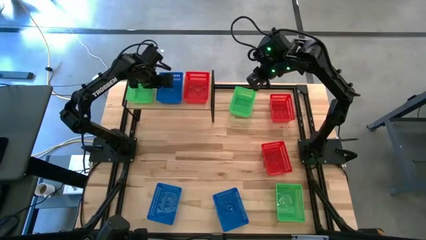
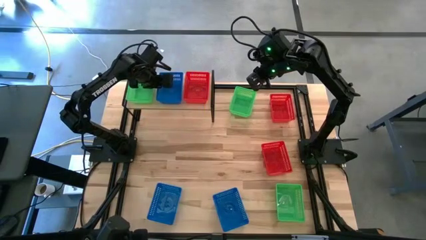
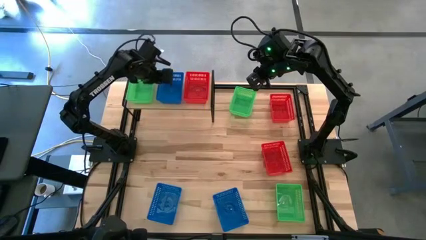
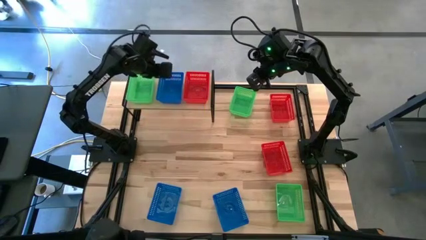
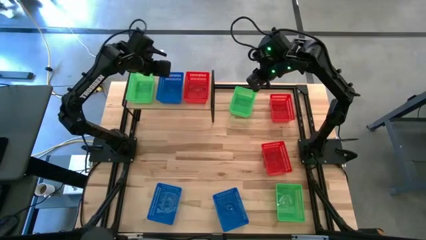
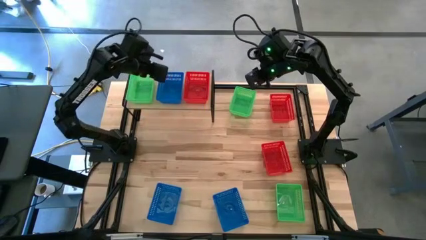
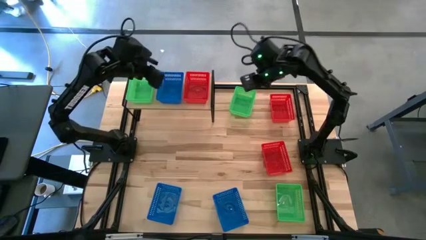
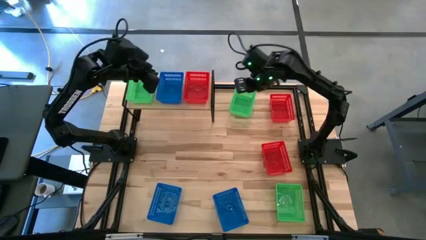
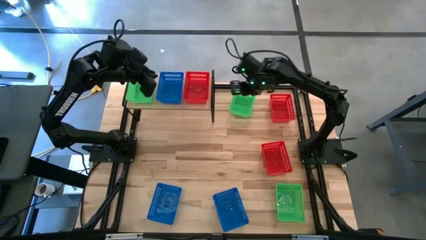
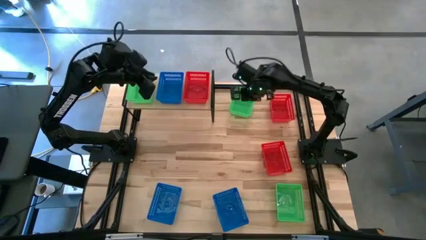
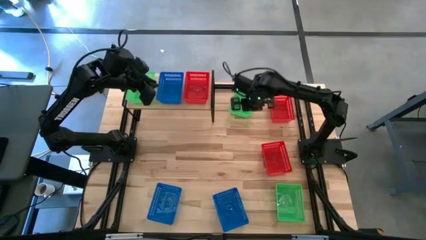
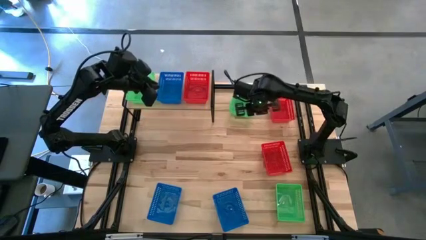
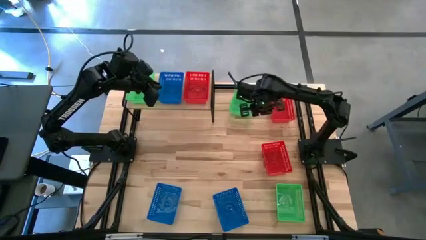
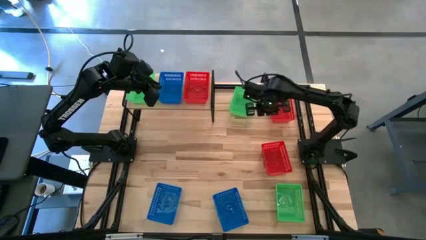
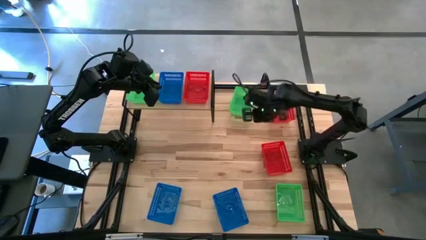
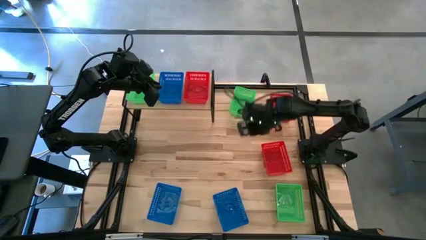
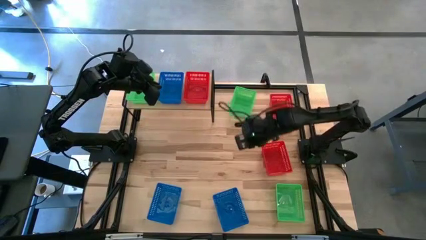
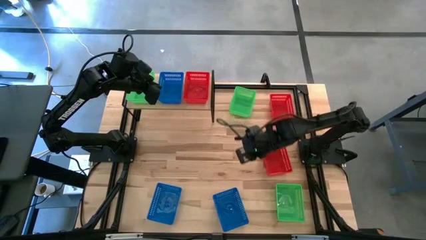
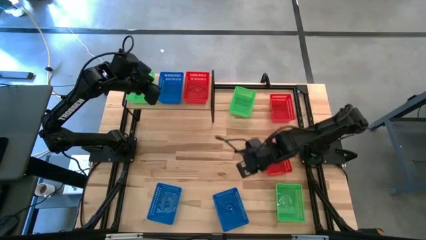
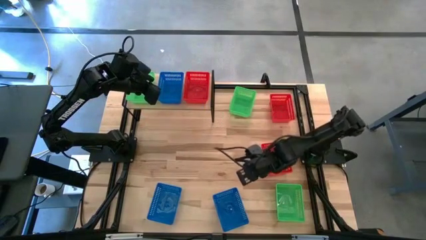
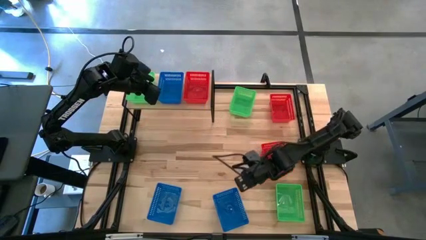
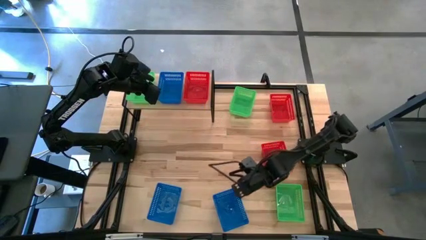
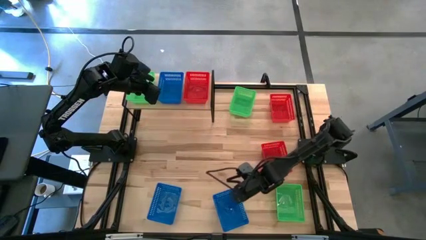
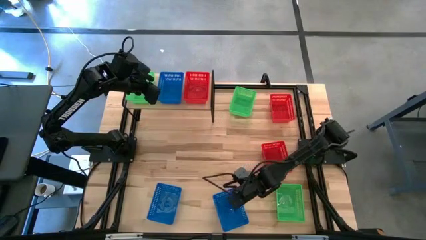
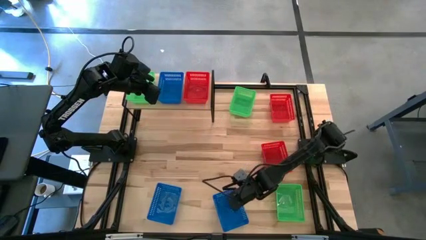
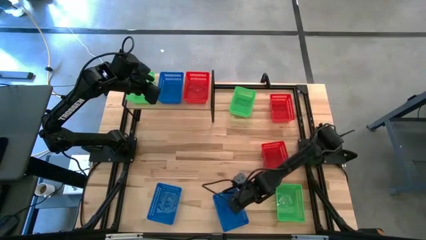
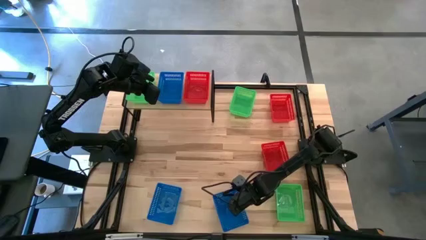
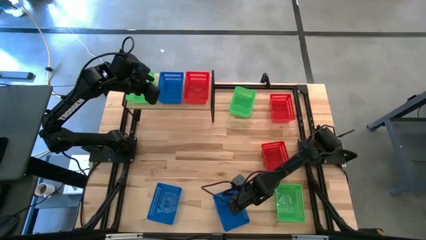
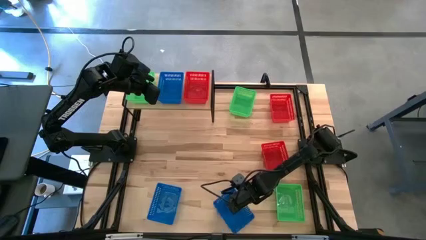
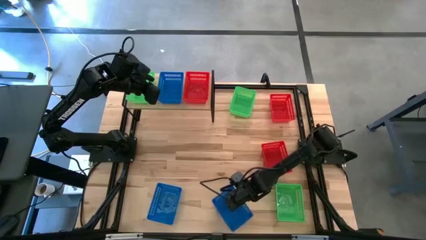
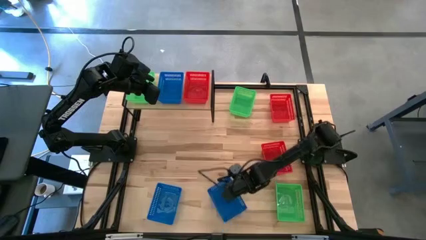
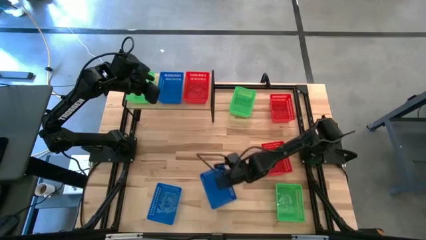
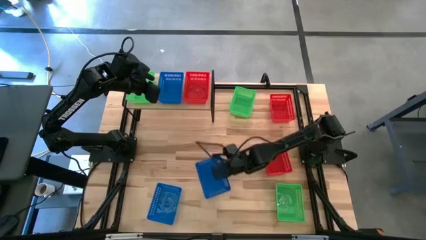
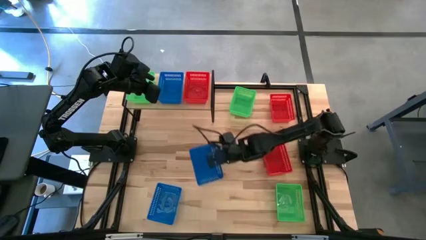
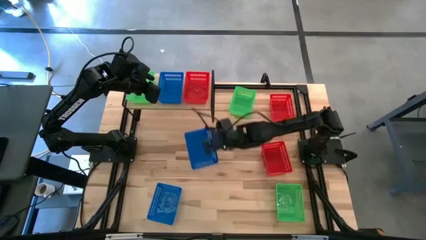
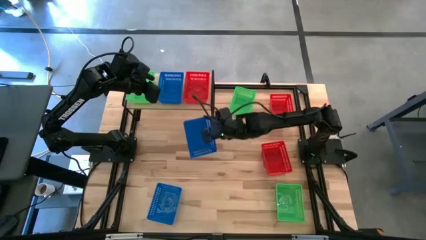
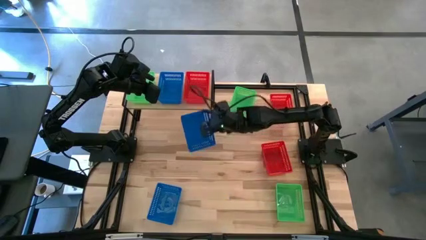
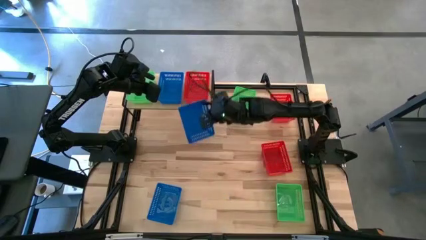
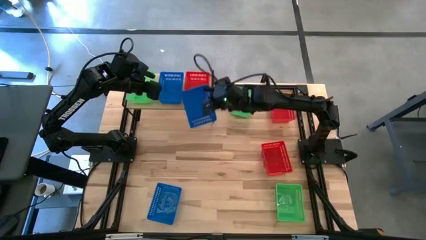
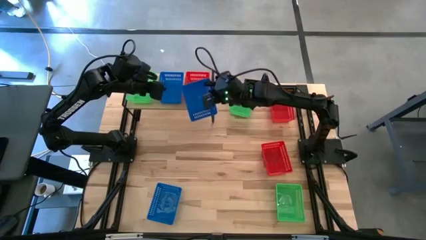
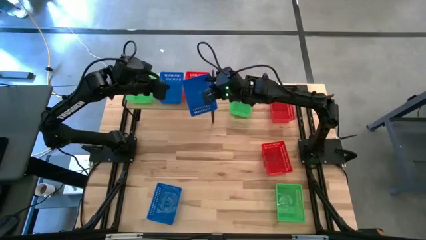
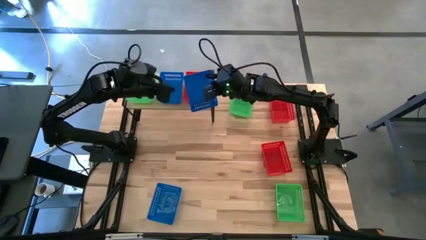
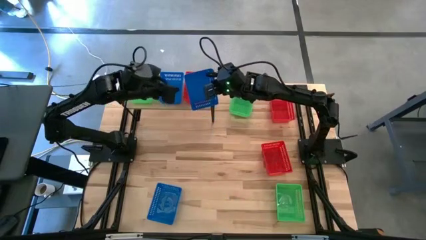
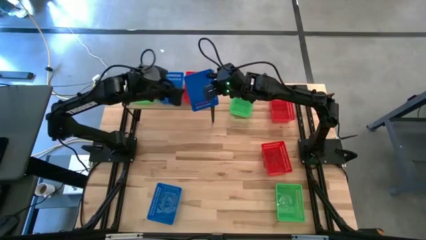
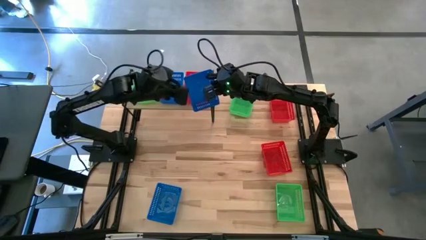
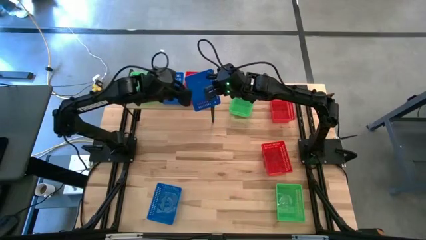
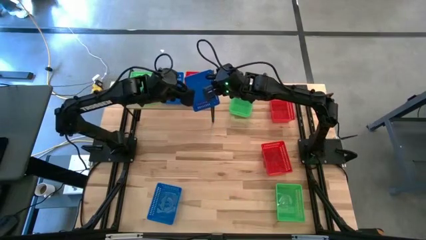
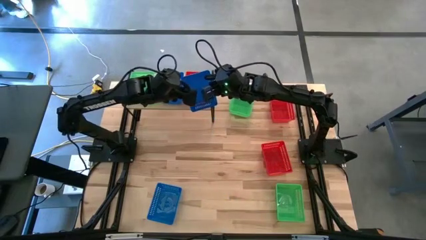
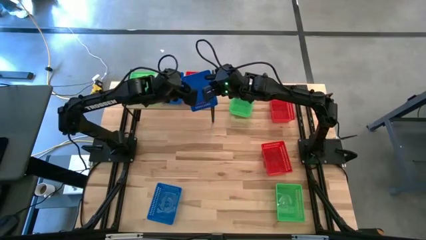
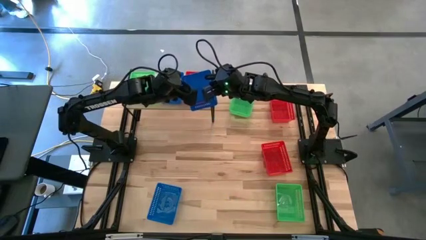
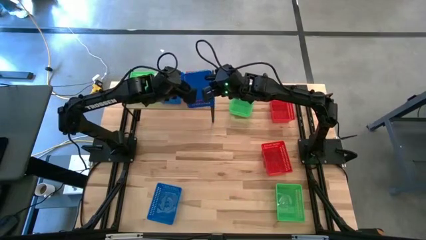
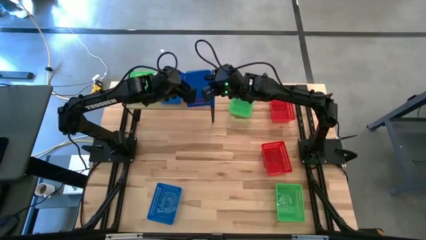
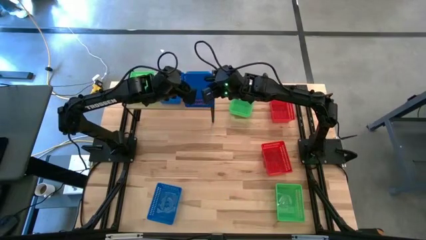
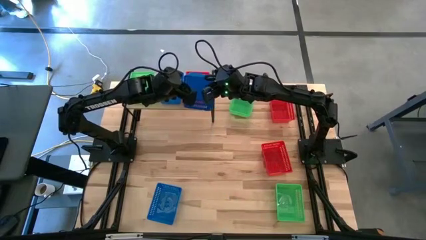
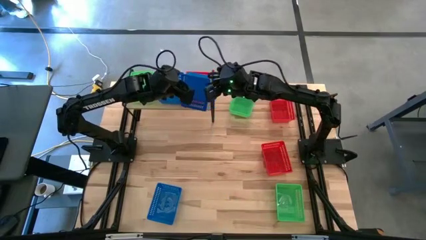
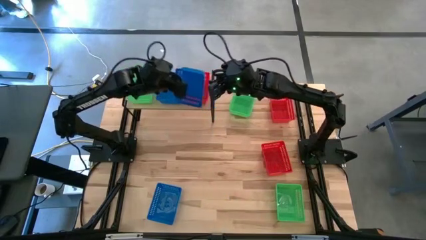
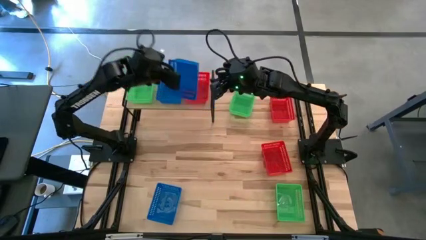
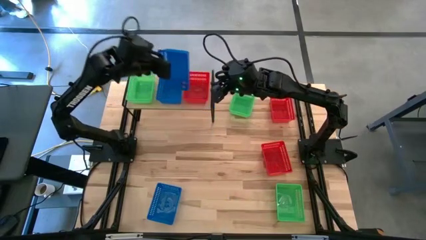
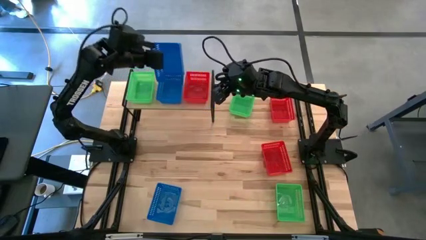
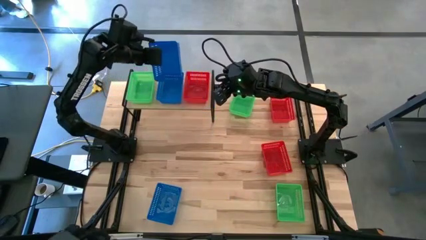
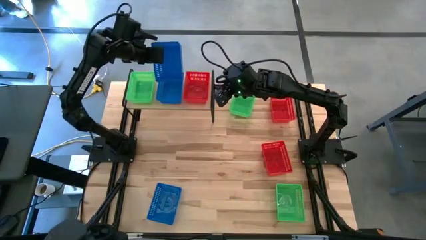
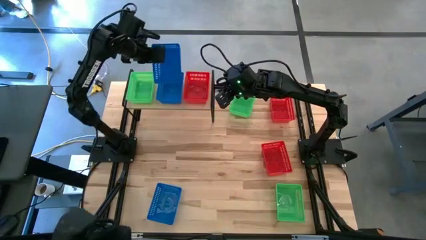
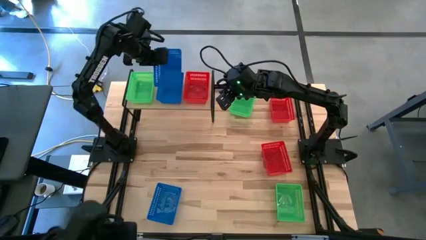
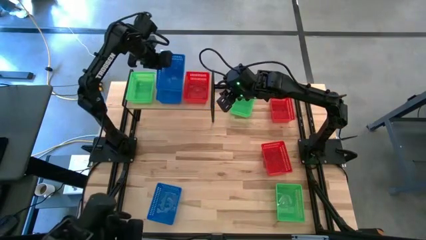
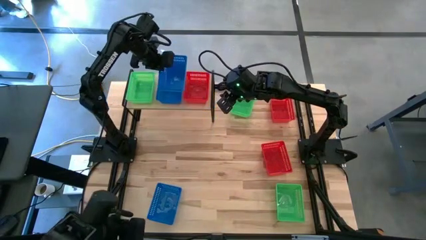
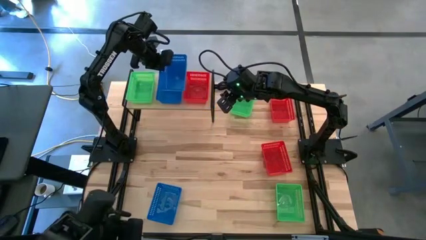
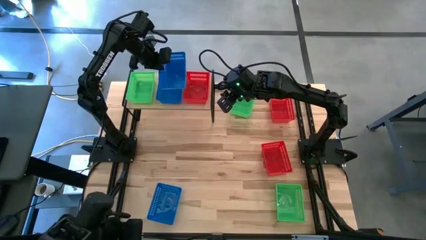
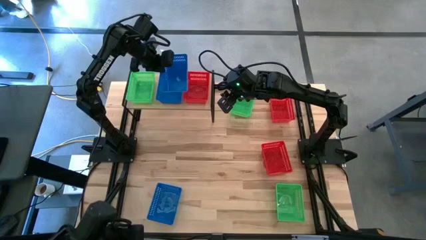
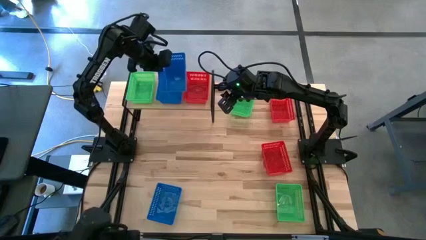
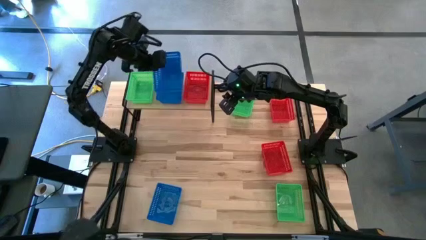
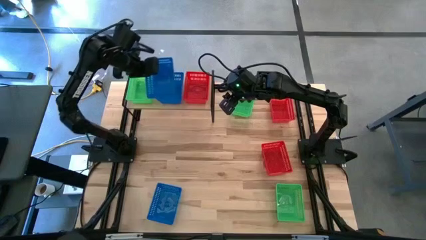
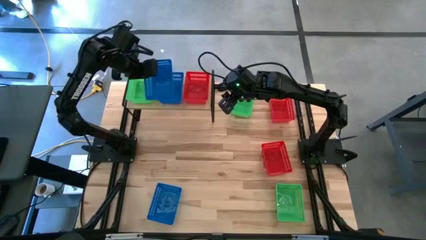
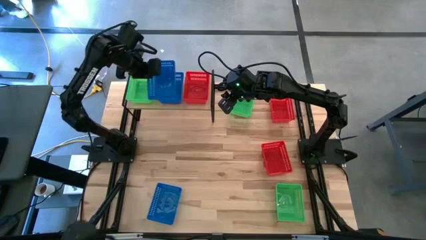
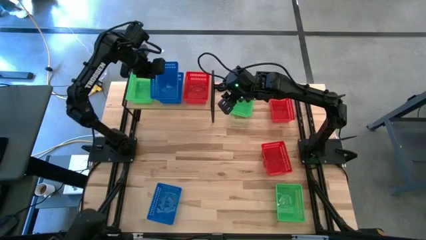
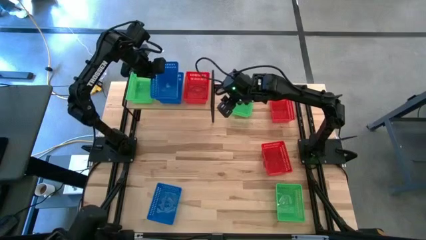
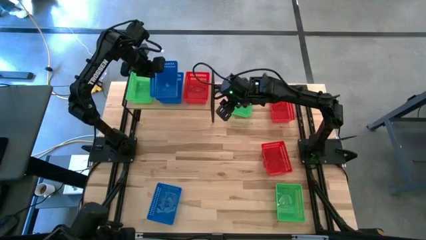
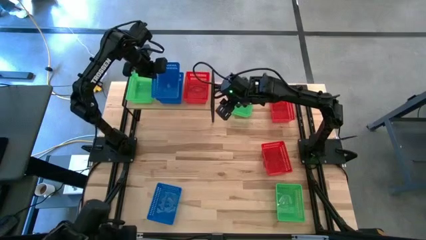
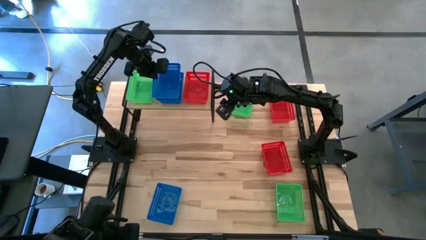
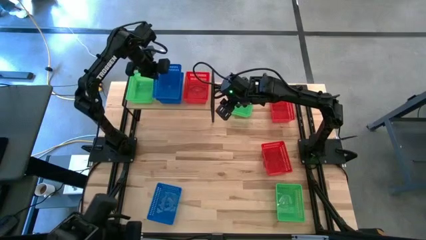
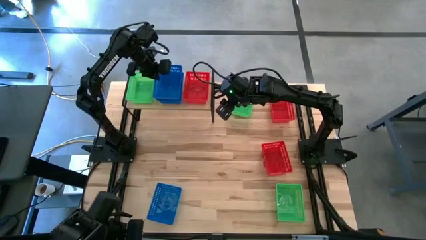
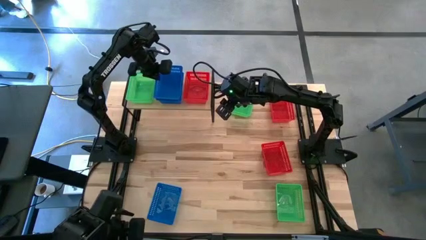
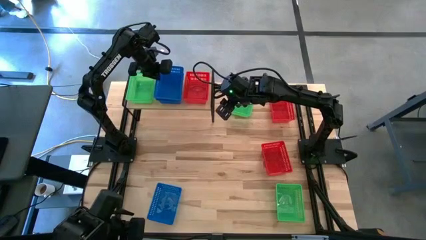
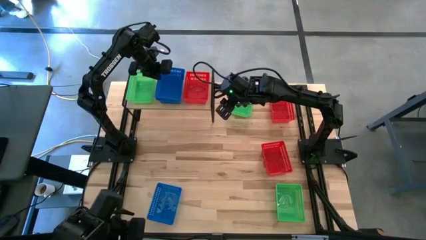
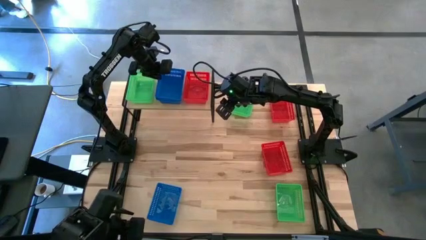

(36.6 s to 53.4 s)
Task: Stack baskets on shelf by color
Stack the right blue bin on top of the blue bin on the shelf
